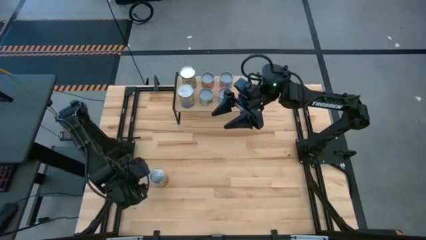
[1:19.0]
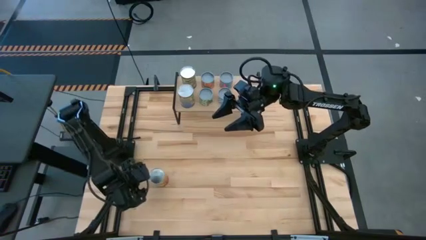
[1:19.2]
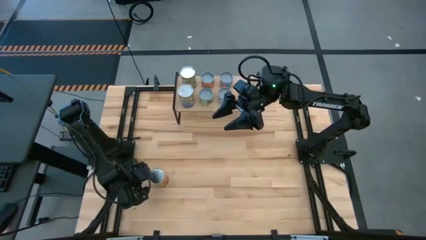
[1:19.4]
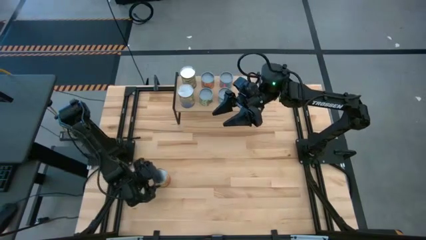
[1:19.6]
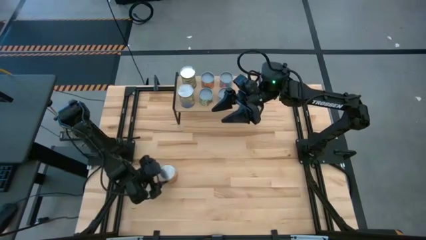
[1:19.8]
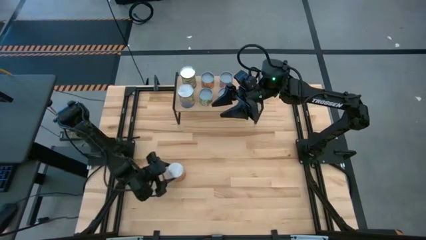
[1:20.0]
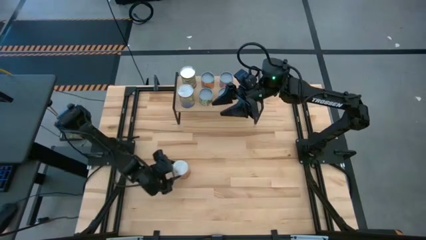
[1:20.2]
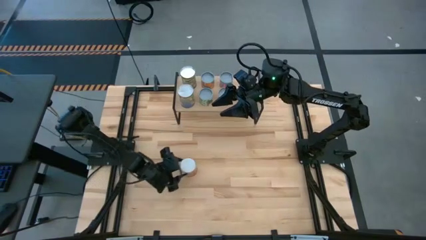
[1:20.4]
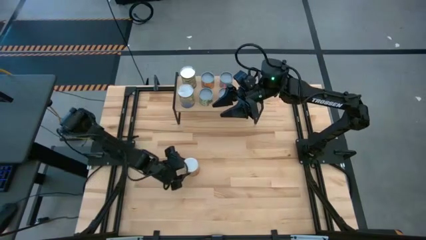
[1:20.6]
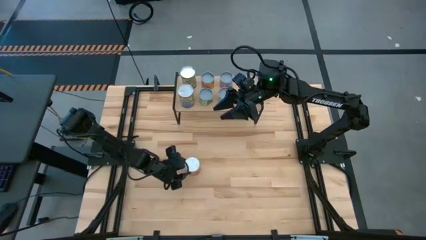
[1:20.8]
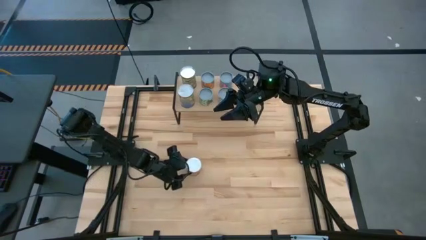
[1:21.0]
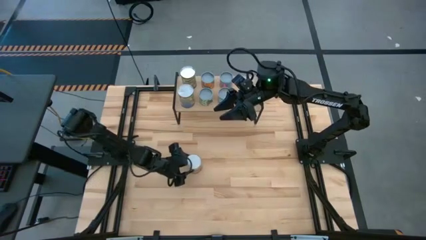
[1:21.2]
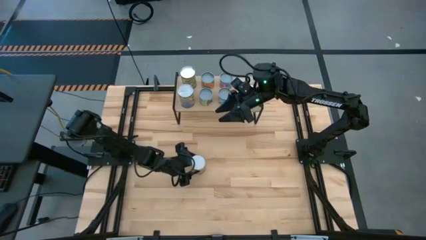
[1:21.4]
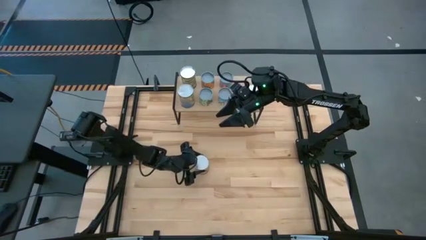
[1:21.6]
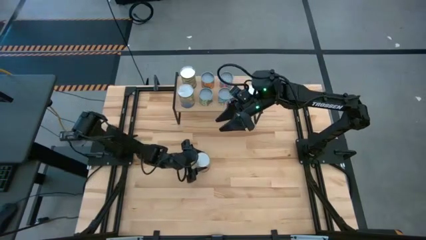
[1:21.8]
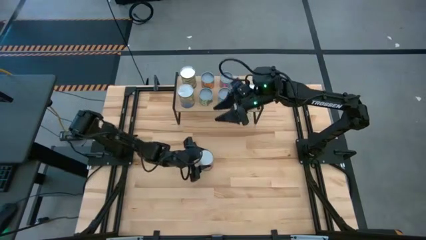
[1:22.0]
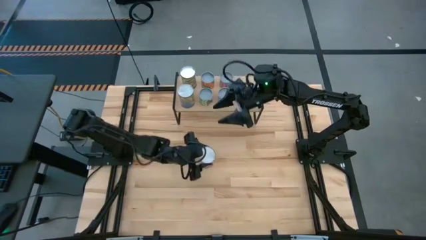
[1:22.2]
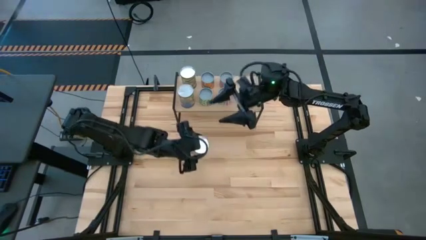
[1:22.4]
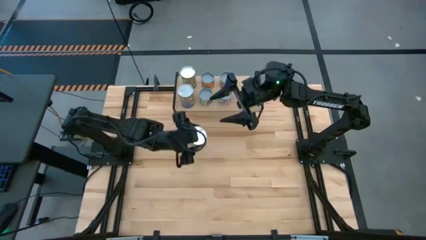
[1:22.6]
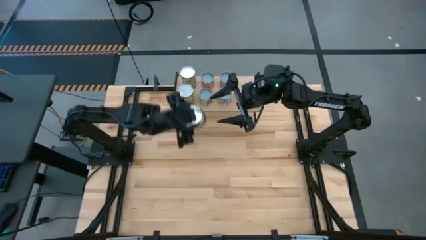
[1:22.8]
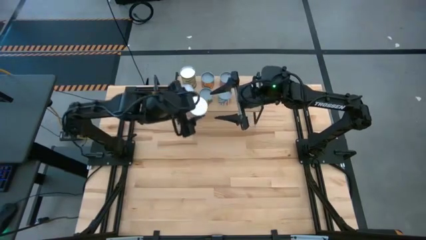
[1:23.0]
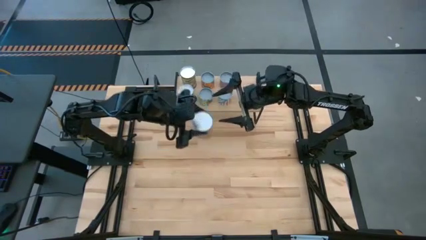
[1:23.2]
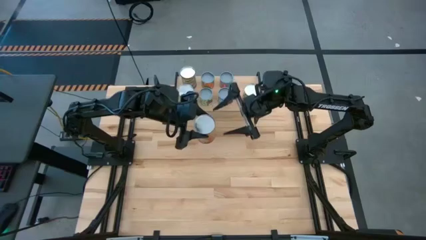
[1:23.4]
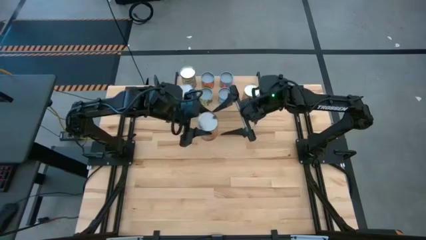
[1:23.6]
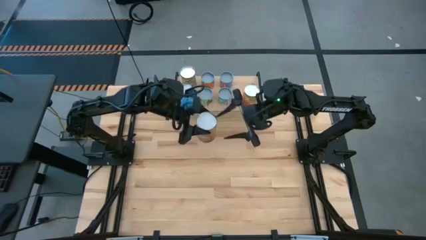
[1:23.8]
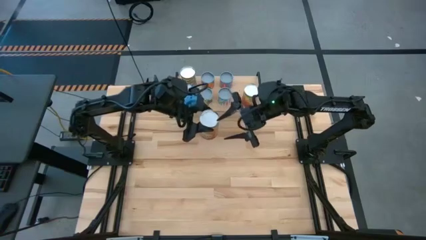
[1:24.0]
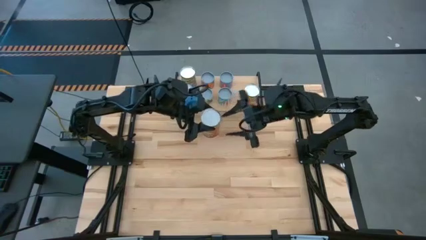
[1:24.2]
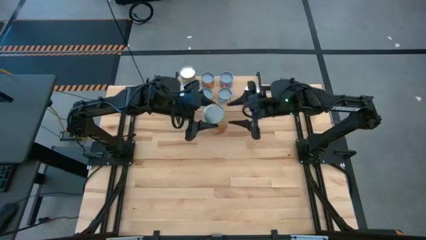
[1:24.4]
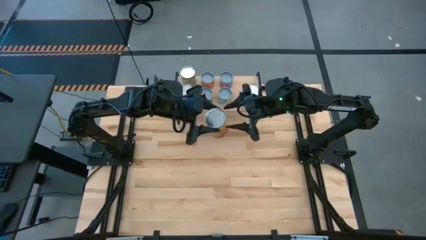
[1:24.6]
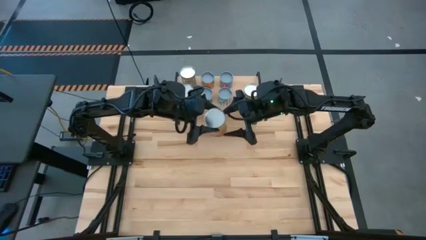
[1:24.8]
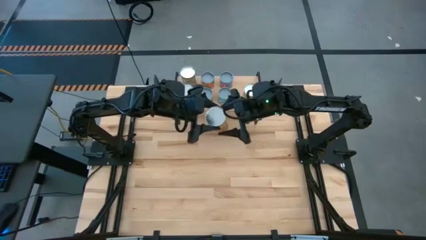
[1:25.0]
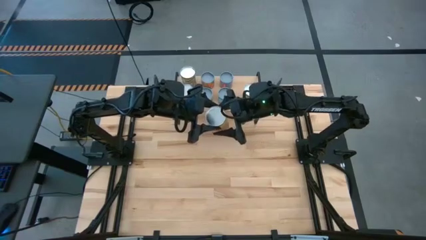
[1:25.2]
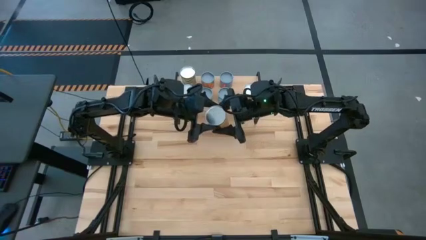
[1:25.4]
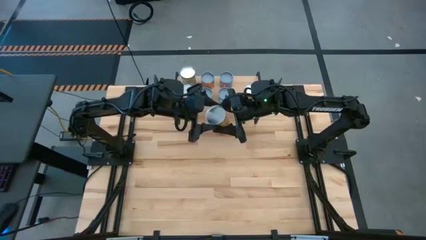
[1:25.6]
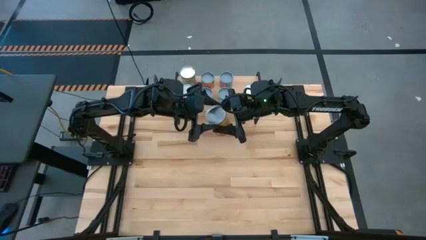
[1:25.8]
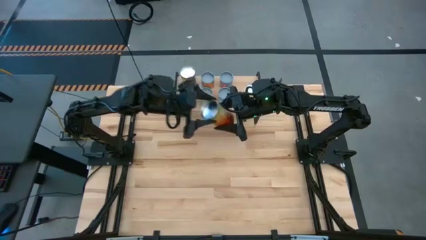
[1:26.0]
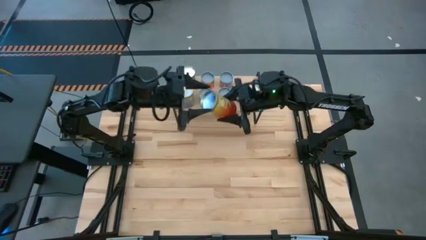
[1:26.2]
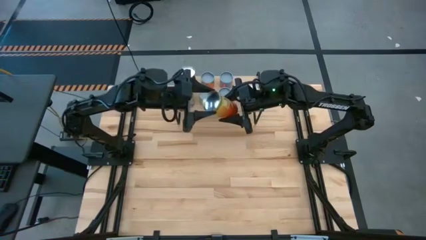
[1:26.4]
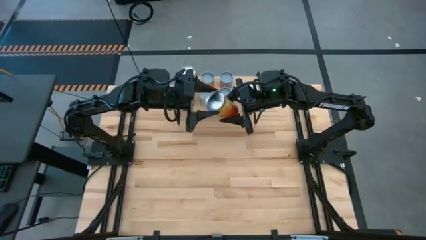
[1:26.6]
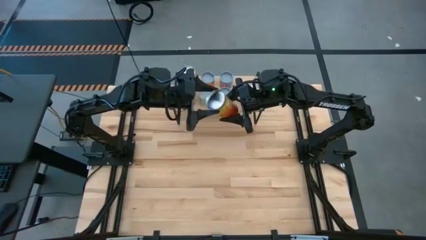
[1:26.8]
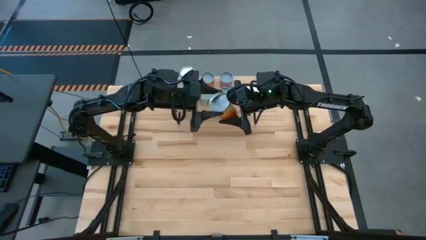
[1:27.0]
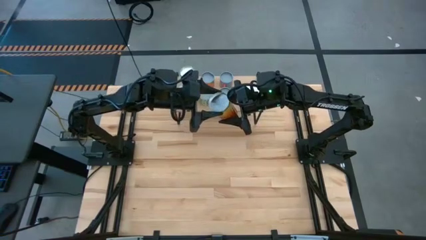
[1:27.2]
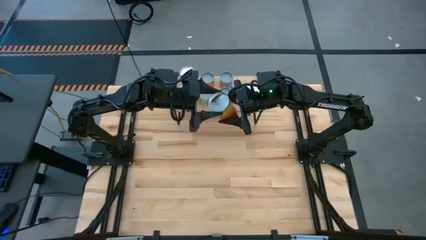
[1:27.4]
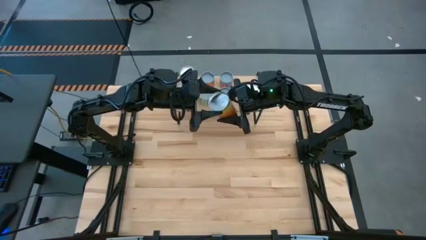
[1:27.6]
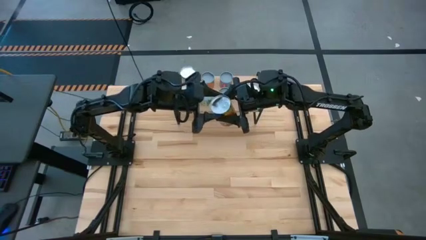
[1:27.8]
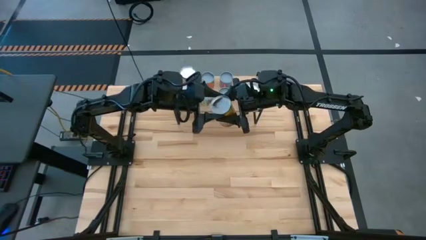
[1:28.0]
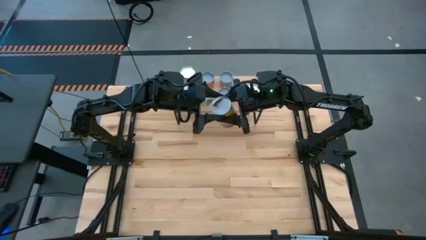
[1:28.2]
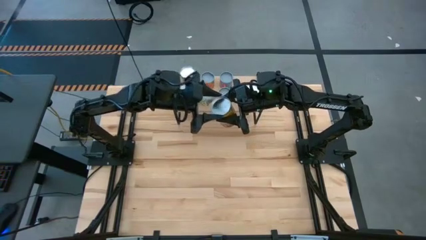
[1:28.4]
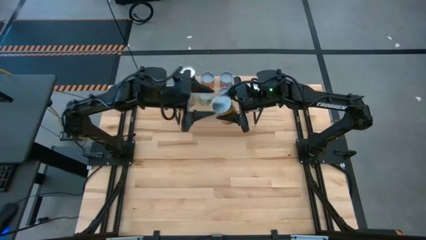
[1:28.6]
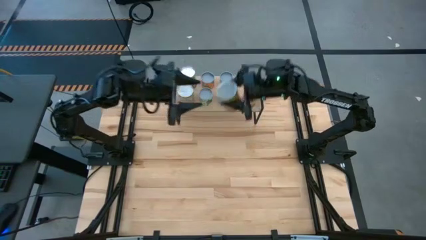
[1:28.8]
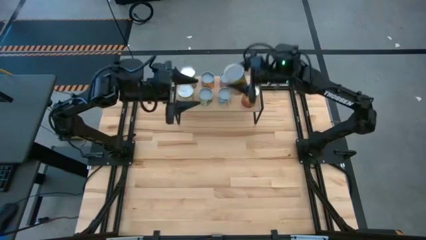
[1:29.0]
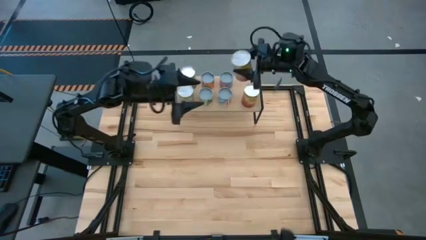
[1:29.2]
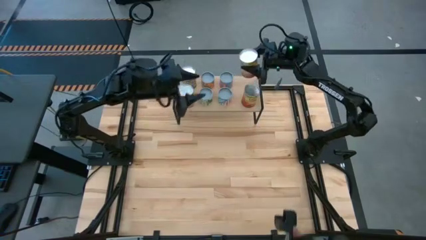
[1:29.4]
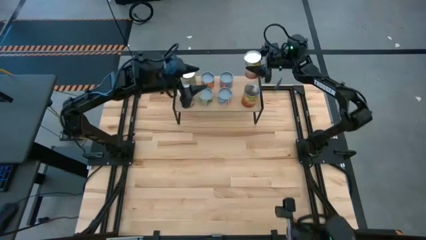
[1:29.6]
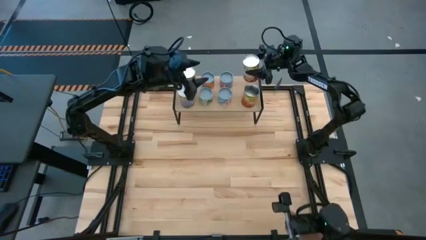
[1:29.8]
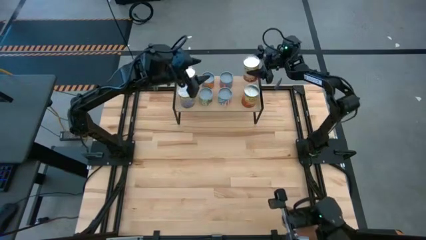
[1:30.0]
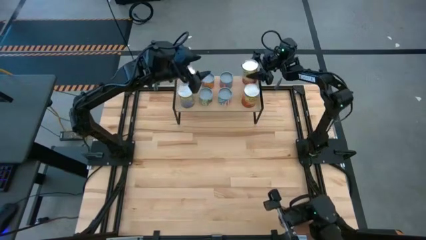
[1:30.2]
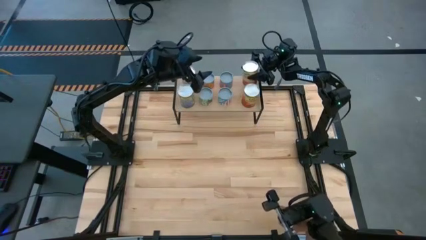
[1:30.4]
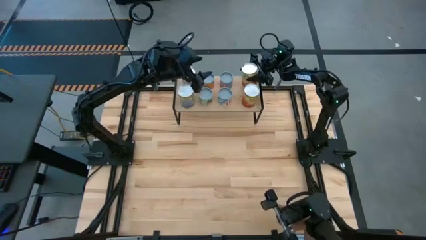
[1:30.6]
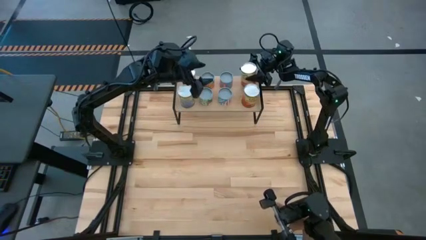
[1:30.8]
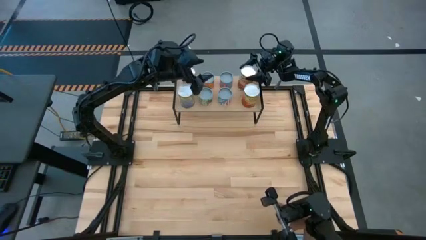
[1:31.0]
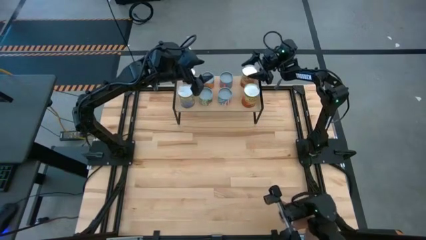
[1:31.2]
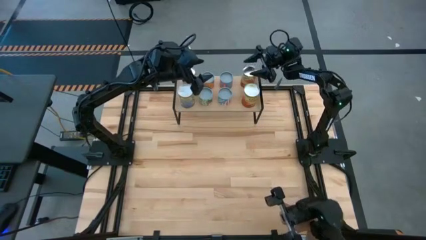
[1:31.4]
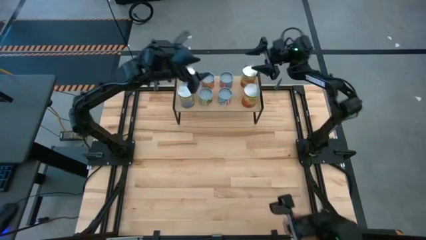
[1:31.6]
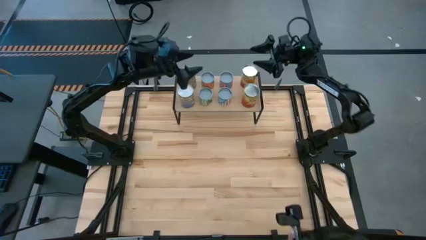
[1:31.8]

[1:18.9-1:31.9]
Task: Pick and place cans onto a shelf
Put the corn can on top of the shelf

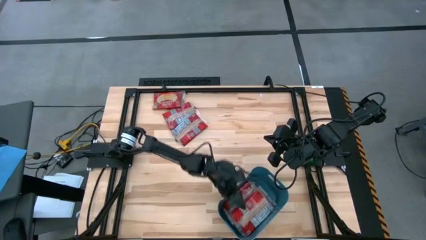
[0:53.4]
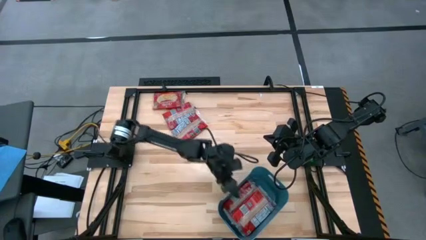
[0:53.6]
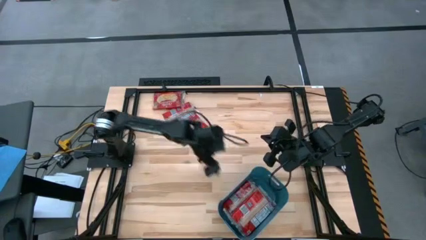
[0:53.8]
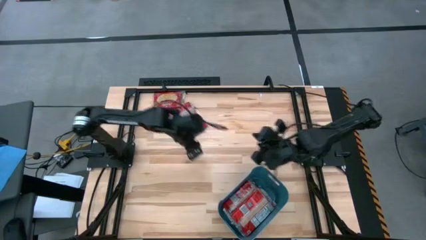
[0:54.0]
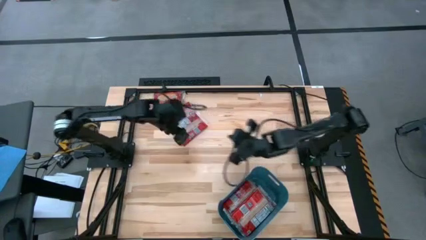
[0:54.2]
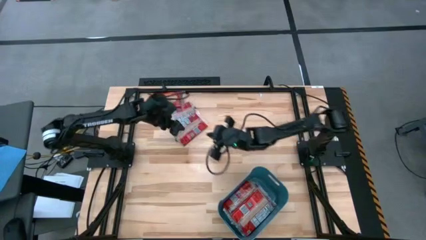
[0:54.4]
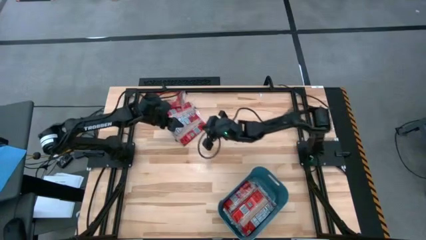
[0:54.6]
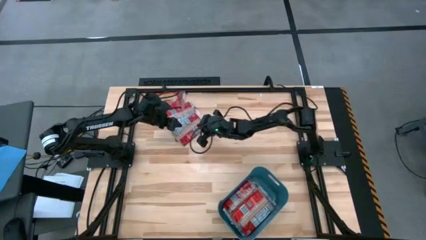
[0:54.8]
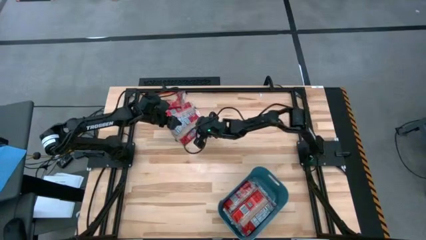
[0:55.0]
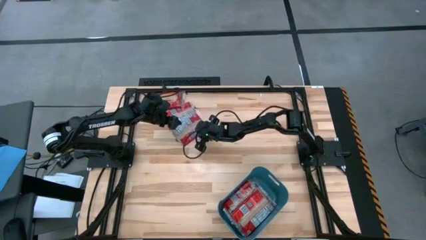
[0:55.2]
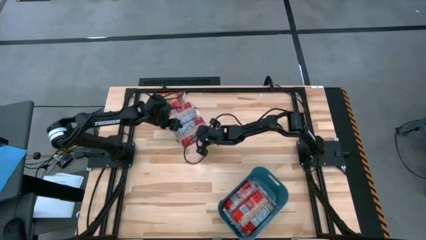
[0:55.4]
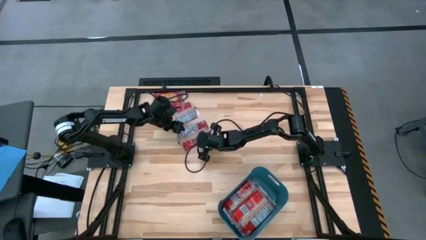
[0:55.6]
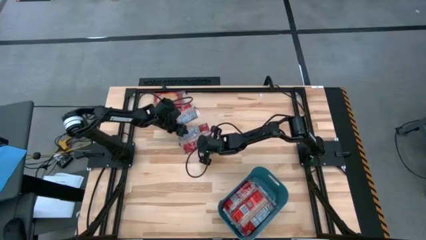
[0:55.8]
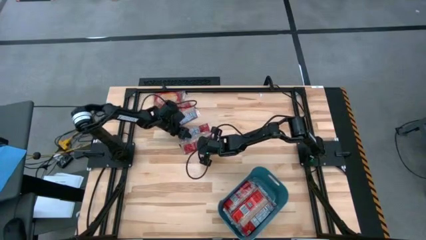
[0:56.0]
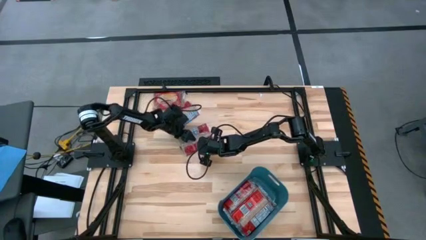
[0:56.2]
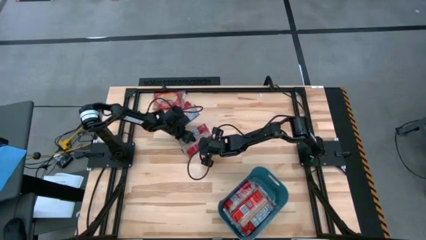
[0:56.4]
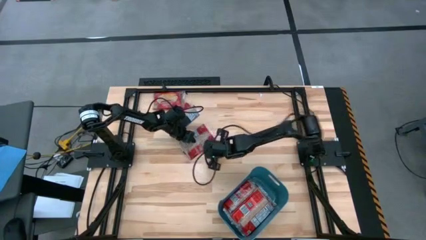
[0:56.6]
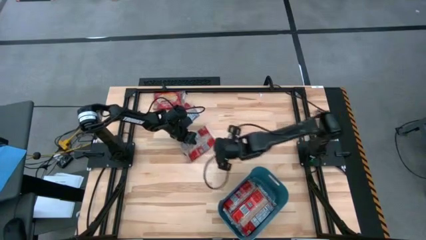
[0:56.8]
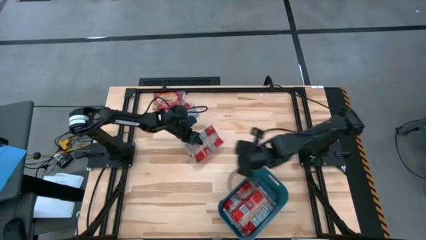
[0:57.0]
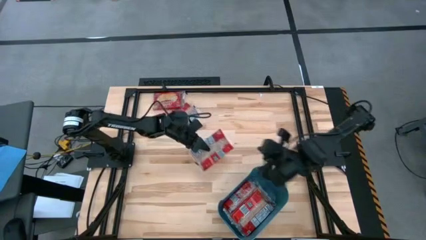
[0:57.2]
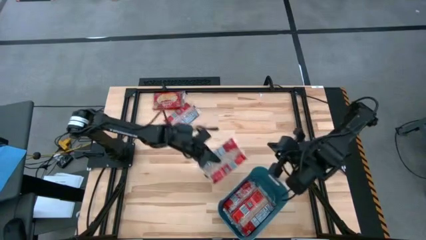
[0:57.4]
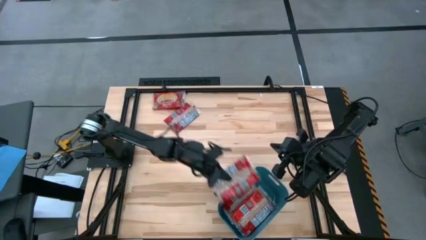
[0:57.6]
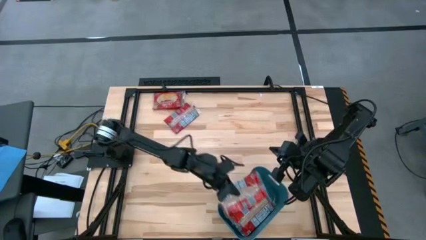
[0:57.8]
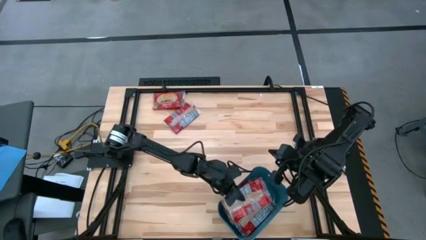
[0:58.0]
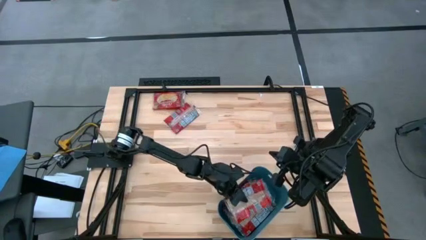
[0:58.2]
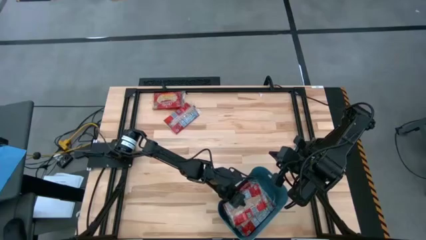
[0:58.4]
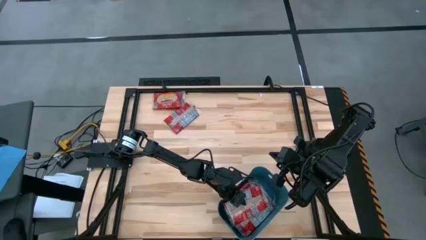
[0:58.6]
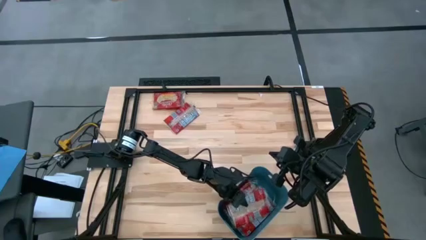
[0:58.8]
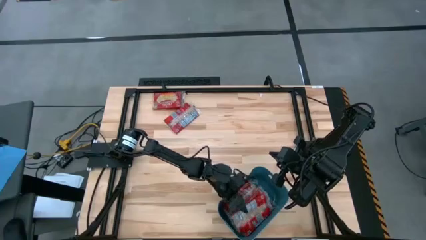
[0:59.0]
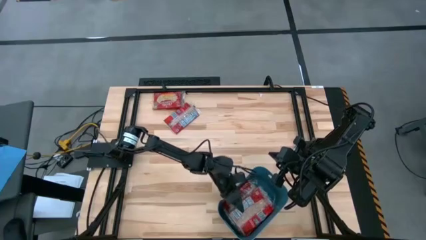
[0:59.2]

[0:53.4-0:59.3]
Task: Sort popcorn bags into baskets
Put the popcorn bag into the blue container
